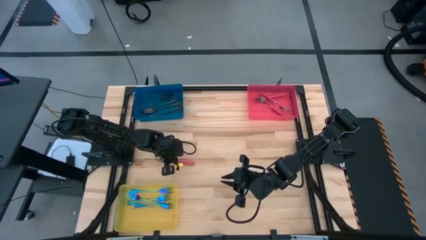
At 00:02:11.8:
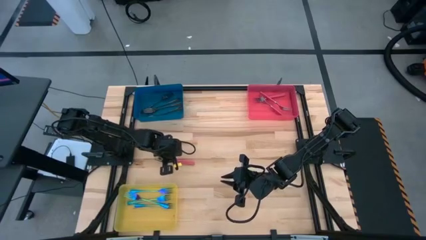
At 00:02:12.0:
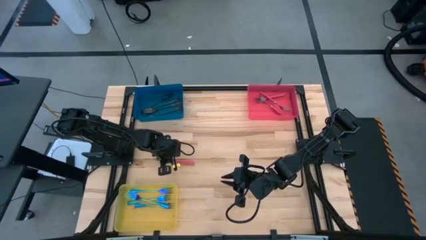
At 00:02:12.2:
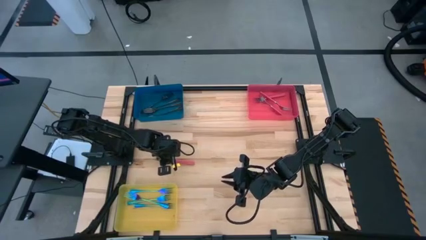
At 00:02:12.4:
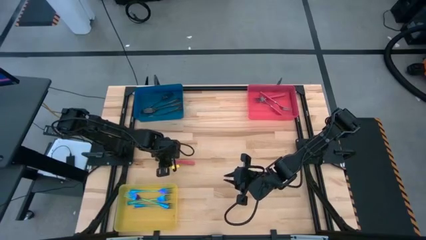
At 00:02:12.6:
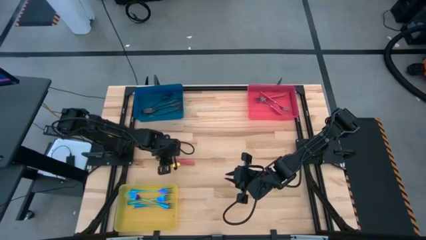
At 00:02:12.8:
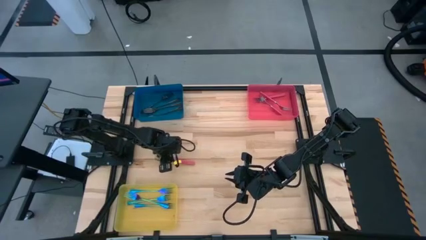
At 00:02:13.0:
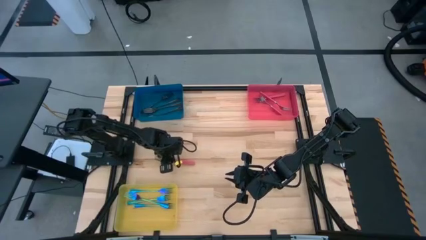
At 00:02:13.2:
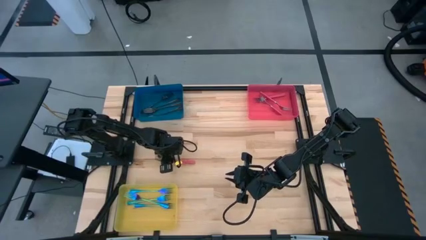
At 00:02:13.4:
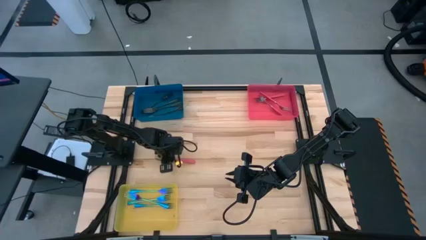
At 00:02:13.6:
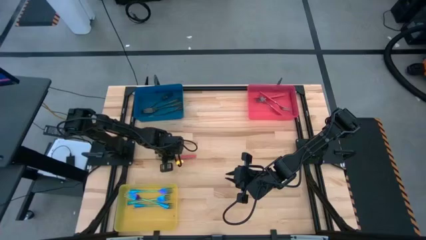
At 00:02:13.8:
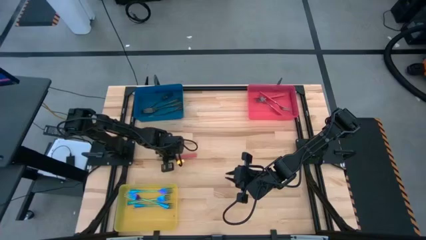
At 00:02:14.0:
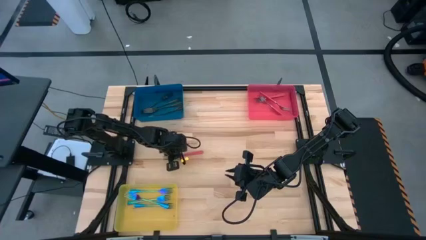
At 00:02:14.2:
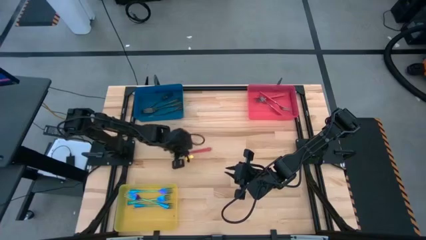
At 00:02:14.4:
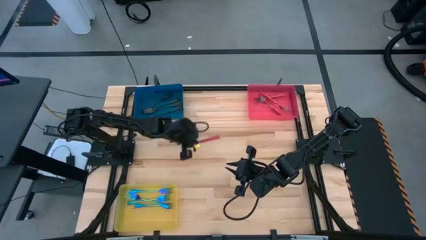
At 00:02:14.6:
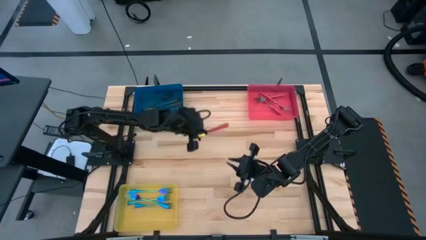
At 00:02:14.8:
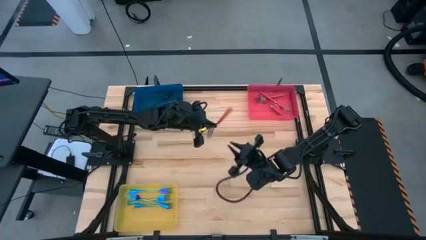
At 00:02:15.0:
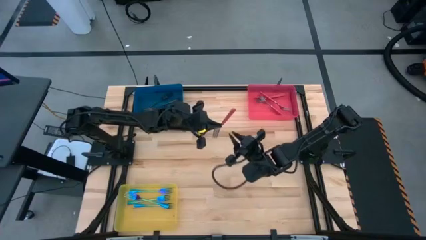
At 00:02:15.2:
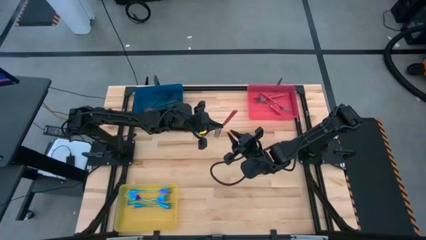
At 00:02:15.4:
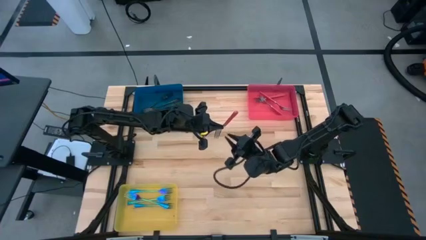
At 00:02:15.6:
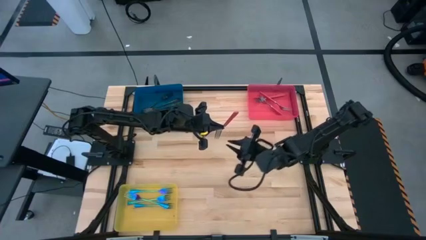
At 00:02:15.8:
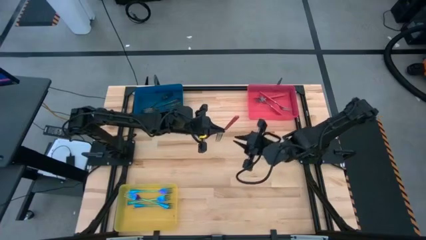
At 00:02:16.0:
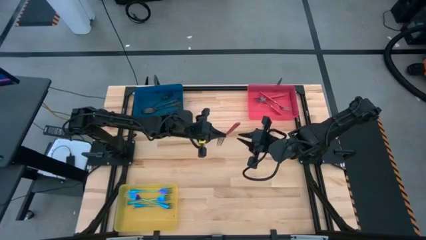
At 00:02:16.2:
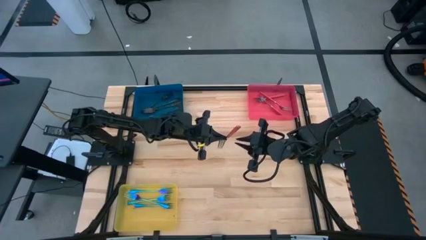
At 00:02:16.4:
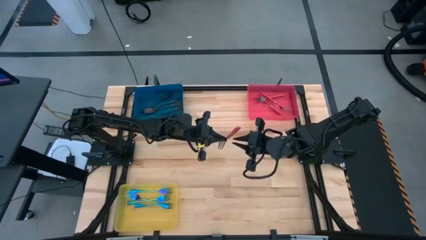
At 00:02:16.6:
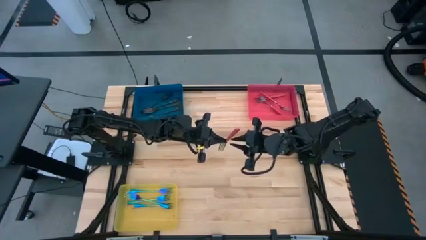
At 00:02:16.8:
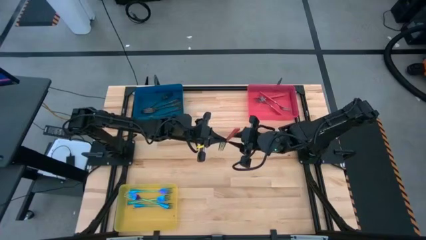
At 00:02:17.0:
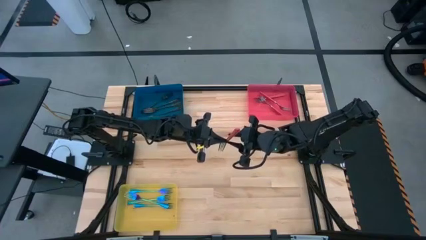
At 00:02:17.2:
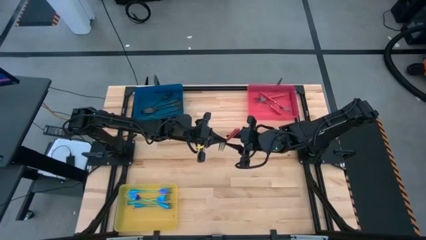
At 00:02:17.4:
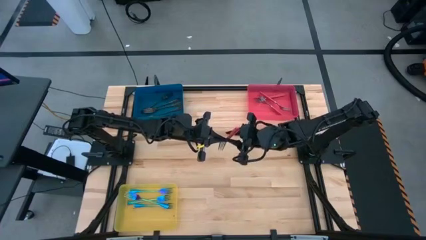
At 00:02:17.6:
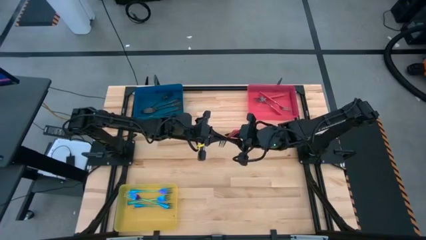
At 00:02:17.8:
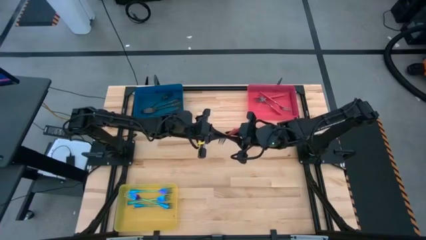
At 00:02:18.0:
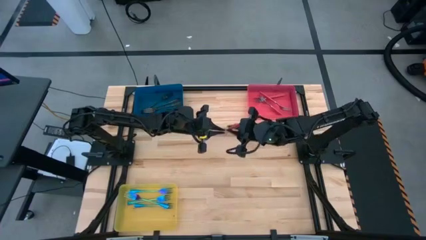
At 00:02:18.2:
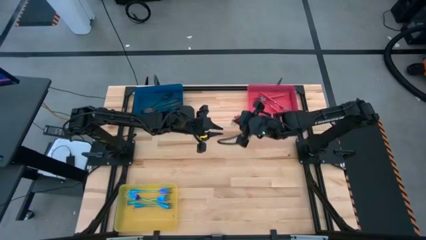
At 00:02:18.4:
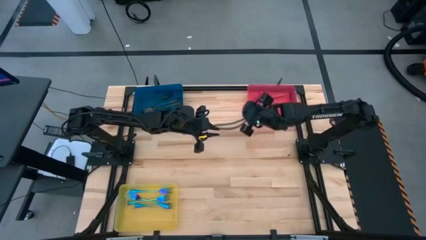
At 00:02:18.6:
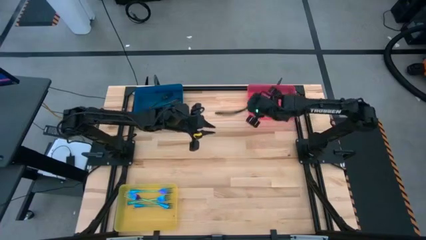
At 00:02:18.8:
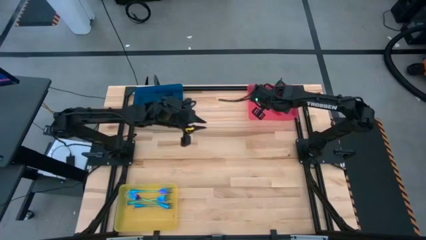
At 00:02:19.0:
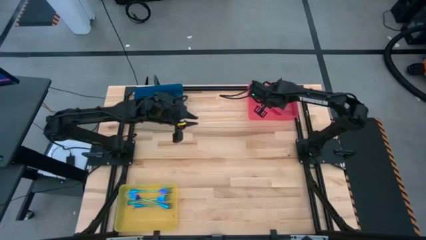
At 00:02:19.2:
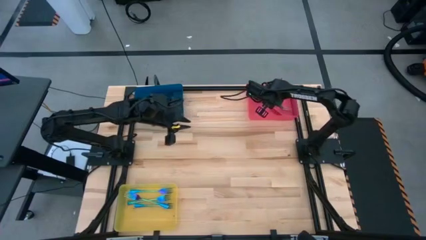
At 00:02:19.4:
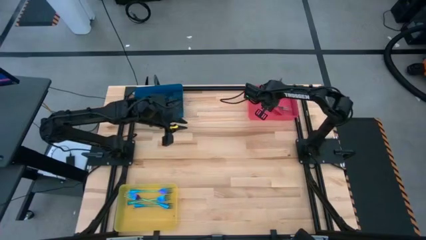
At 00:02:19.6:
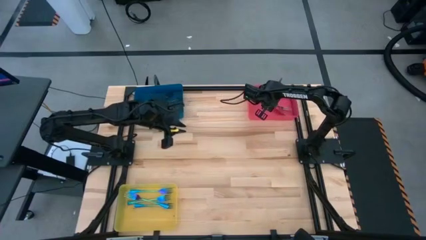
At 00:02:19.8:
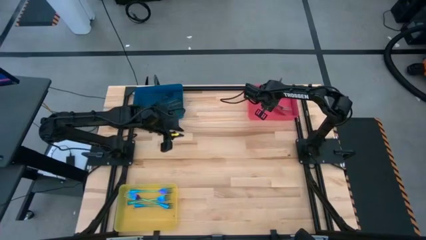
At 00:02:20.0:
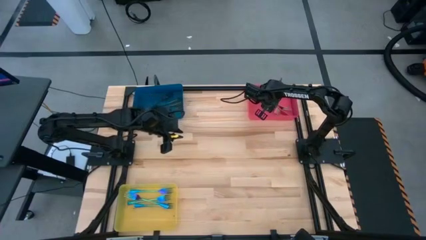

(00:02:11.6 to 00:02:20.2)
Task: Sort silverware by color (type)
Put the pink fork into the pink bin

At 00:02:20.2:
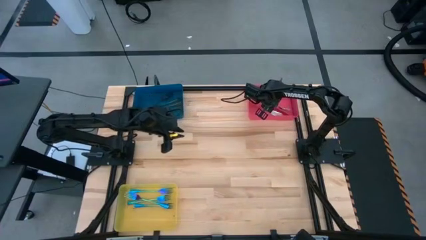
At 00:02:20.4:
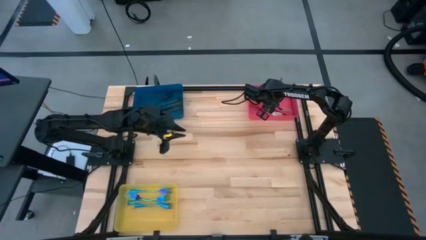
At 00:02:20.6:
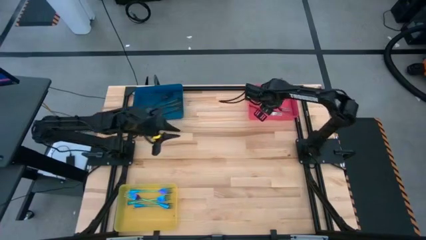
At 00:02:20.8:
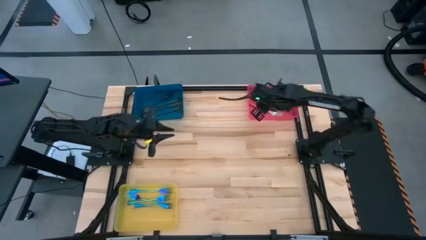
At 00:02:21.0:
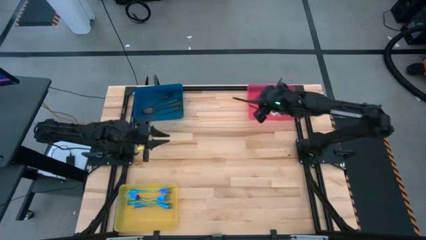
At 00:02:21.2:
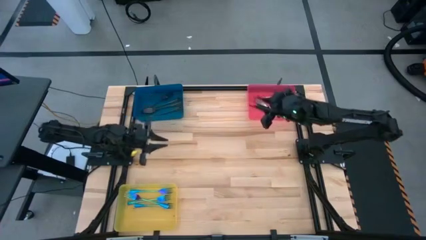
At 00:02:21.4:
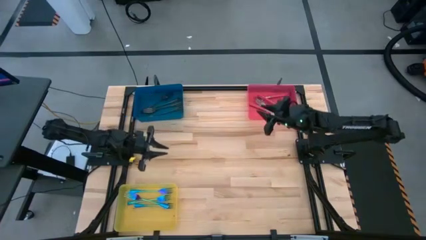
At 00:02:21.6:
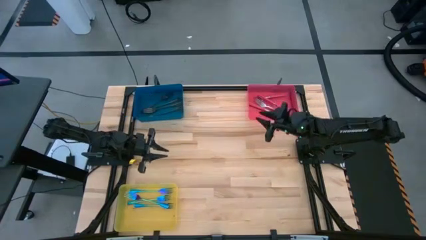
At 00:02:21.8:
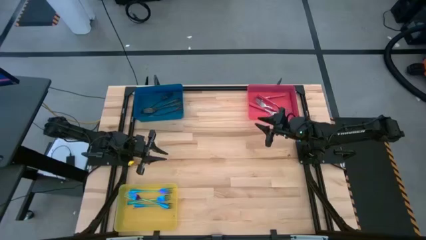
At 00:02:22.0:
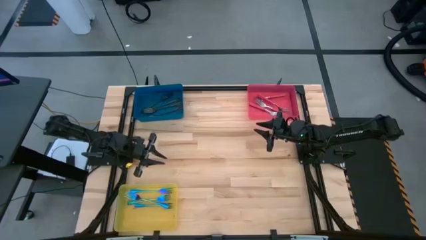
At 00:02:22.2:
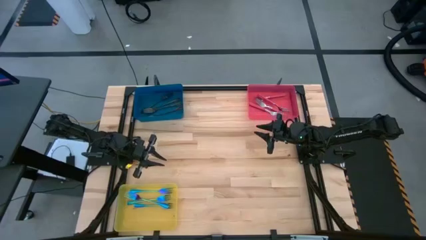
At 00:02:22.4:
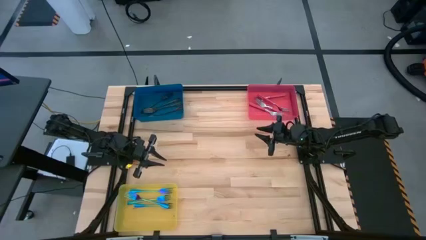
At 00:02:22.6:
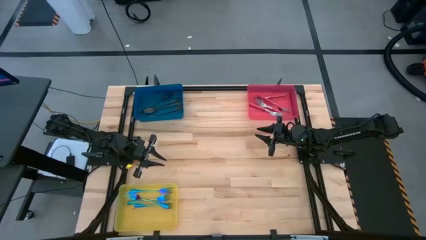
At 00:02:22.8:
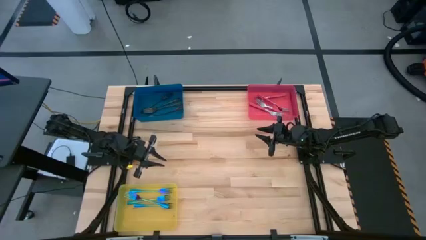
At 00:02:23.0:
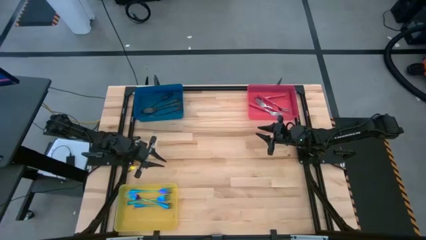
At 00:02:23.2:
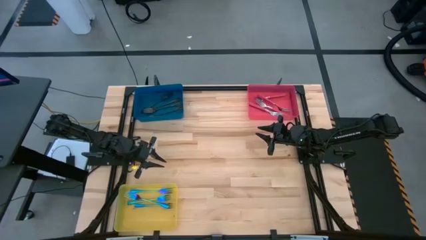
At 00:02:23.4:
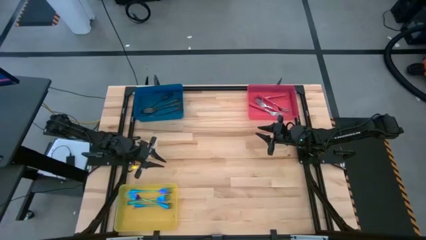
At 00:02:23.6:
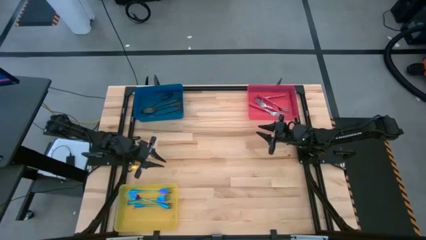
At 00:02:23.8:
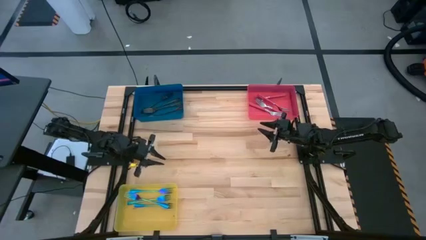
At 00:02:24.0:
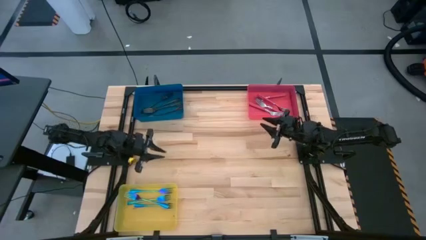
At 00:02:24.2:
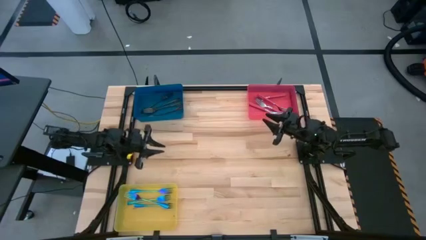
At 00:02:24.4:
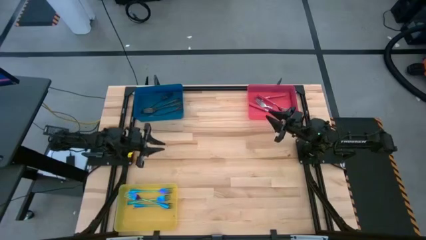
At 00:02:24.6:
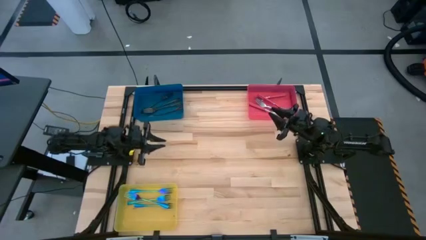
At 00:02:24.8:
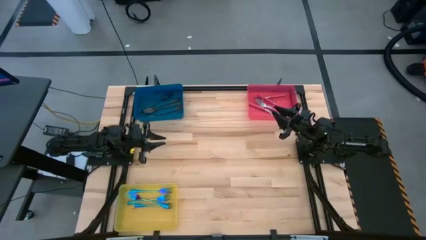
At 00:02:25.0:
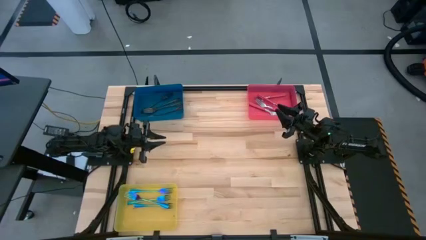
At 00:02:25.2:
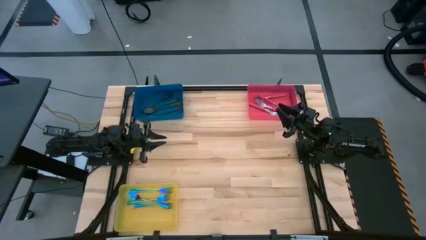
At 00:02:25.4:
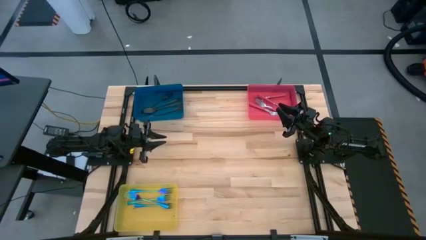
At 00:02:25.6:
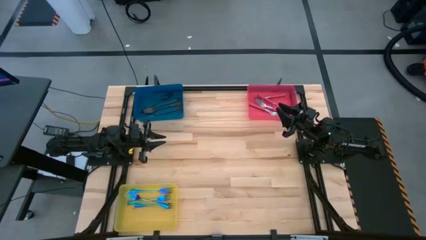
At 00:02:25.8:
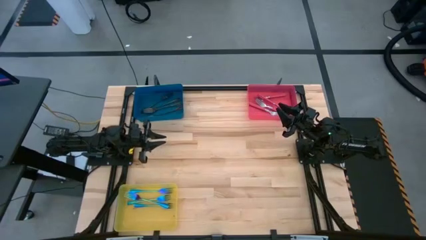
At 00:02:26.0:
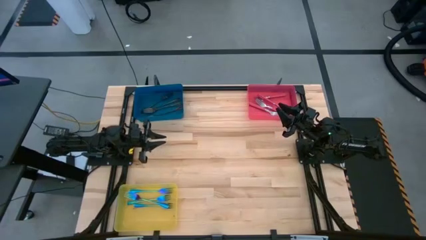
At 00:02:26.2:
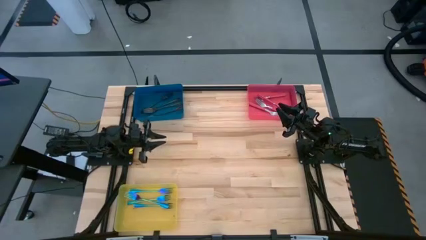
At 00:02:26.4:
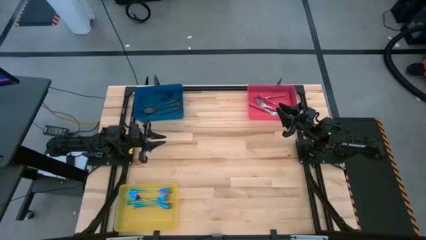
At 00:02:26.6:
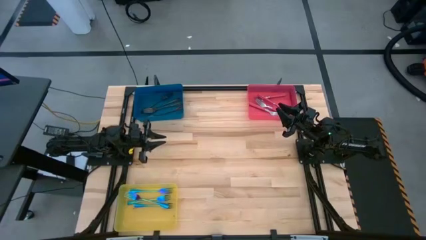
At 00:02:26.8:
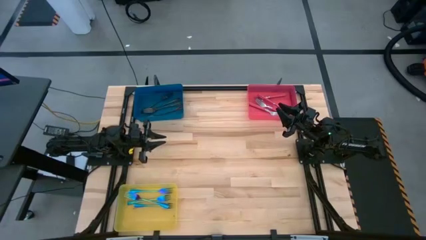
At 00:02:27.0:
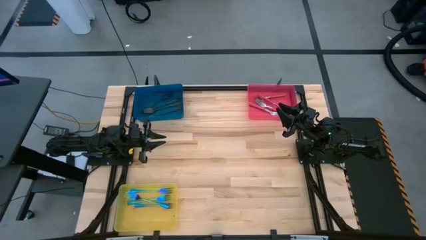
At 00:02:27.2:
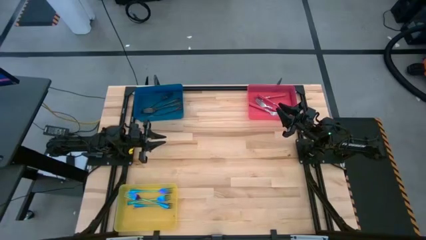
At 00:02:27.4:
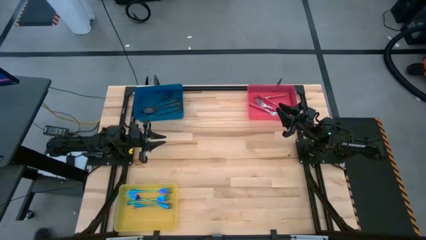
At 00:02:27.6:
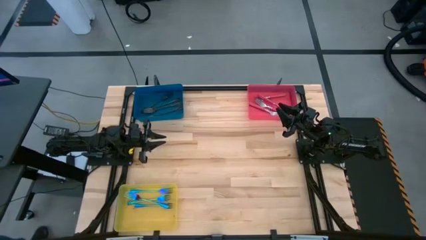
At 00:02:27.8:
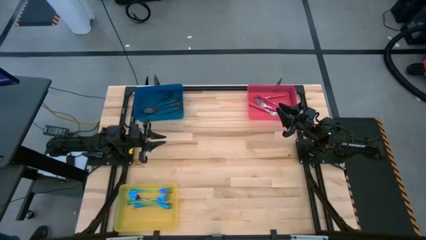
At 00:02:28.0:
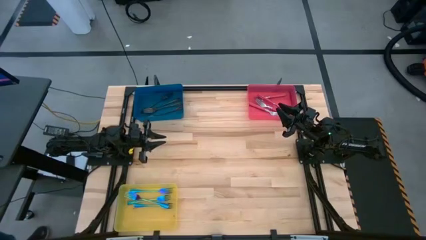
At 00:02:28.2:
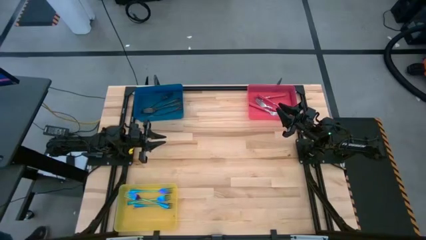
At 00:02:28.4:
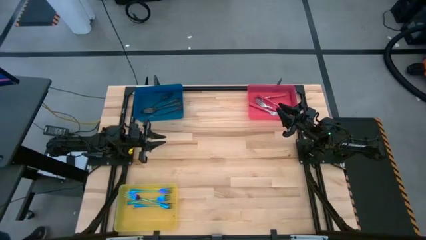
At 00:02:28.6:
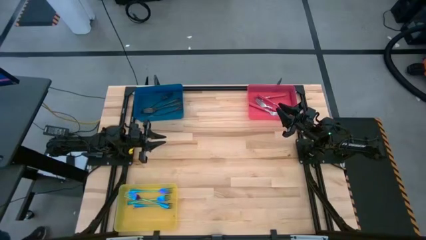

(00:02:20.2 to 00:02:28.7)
Return to Home Position
